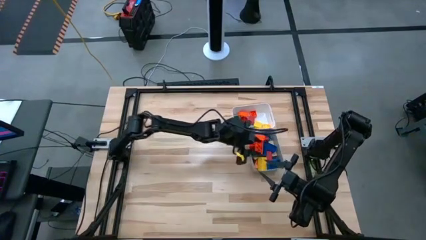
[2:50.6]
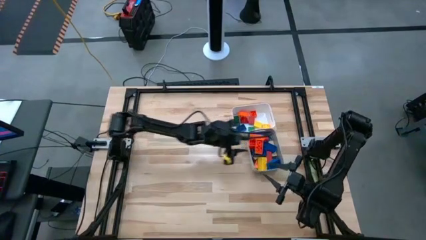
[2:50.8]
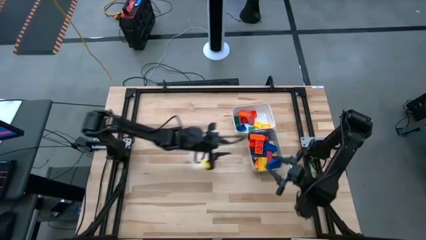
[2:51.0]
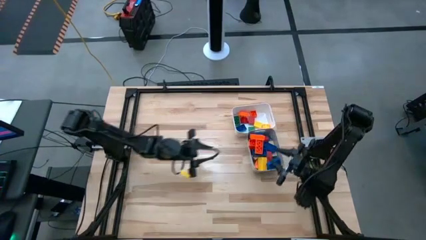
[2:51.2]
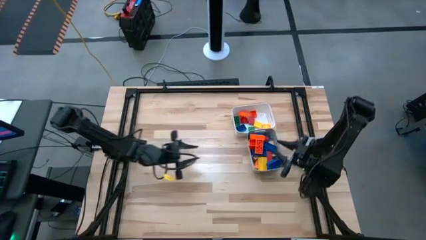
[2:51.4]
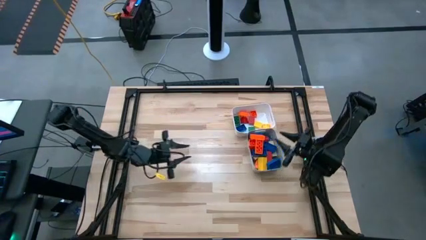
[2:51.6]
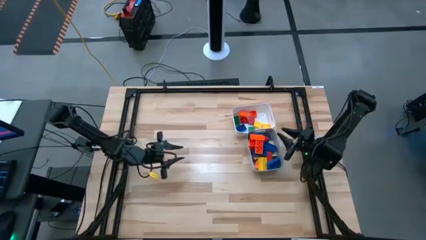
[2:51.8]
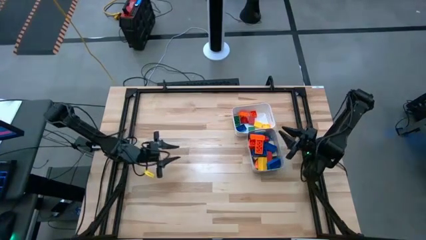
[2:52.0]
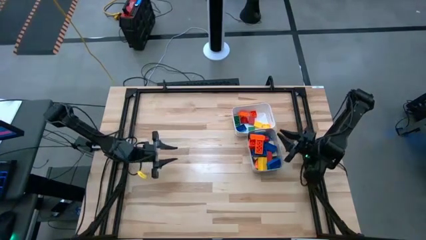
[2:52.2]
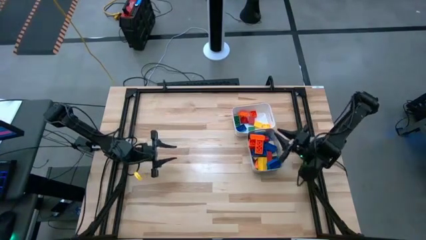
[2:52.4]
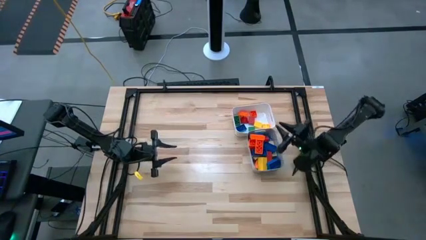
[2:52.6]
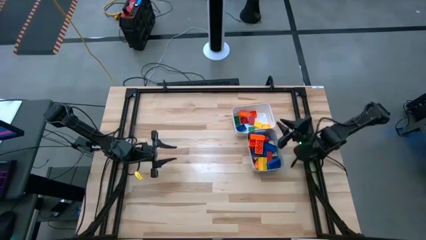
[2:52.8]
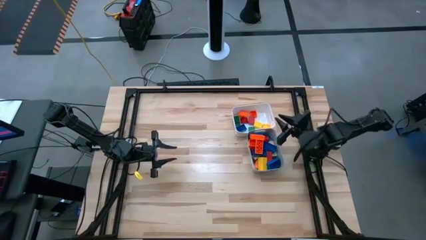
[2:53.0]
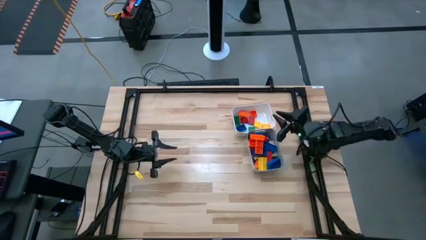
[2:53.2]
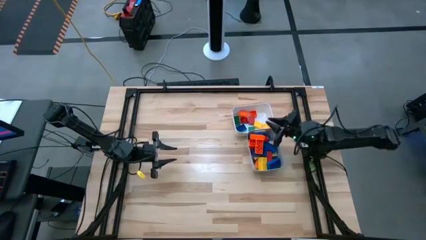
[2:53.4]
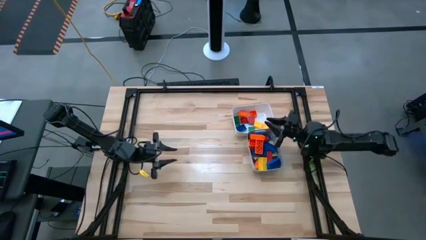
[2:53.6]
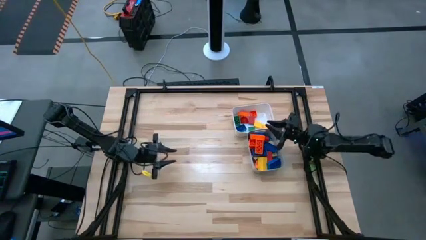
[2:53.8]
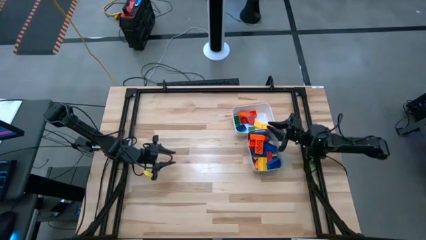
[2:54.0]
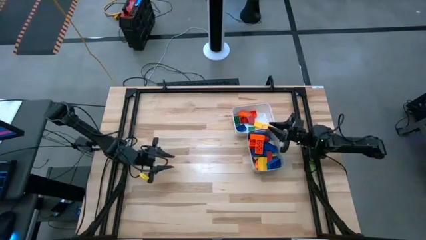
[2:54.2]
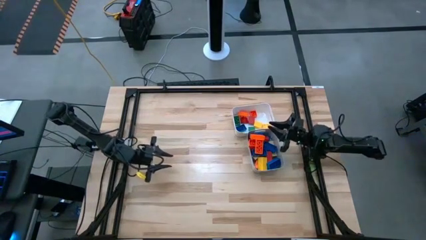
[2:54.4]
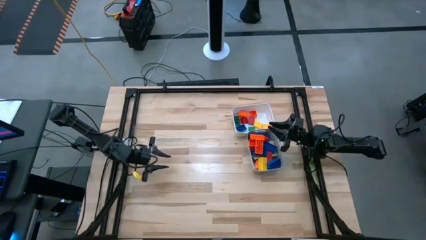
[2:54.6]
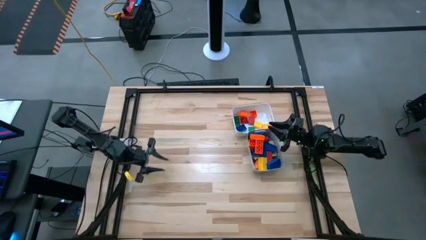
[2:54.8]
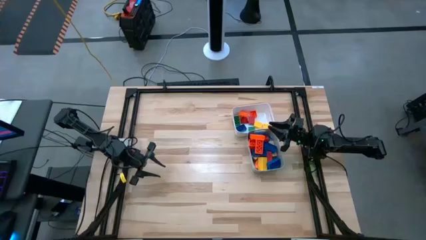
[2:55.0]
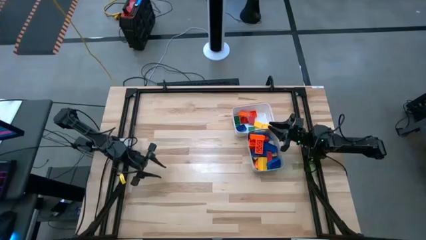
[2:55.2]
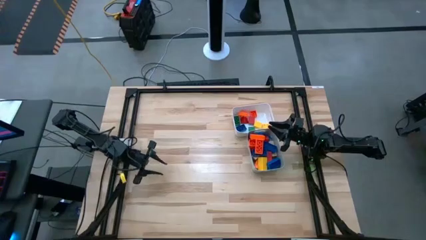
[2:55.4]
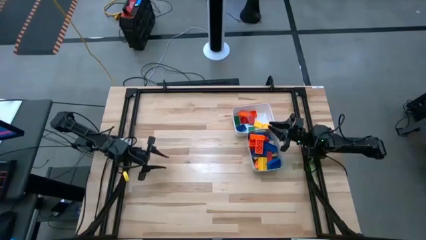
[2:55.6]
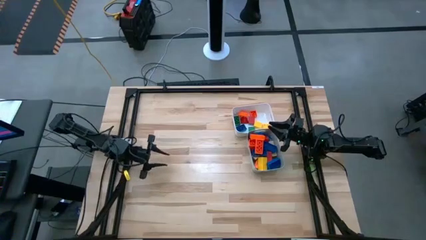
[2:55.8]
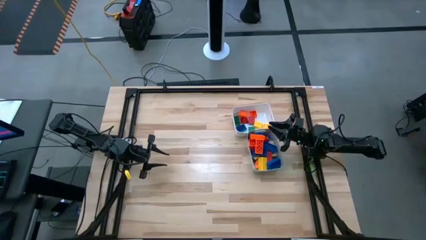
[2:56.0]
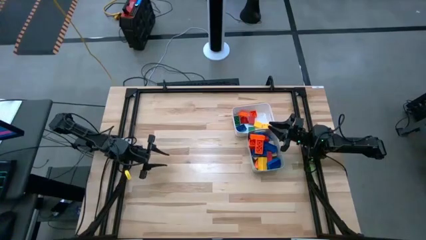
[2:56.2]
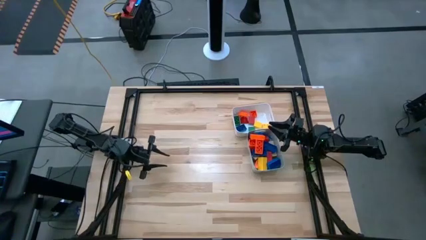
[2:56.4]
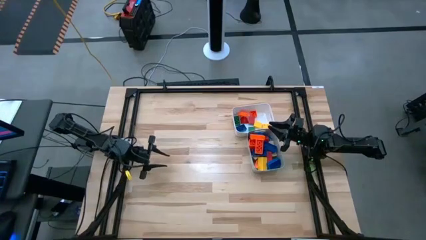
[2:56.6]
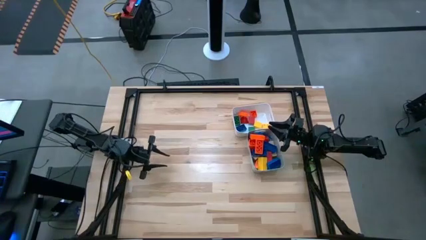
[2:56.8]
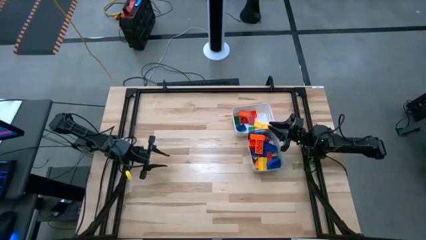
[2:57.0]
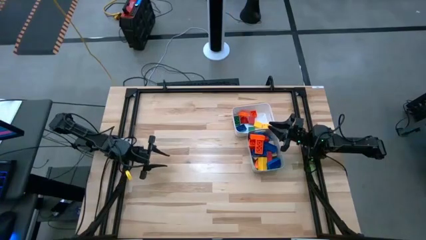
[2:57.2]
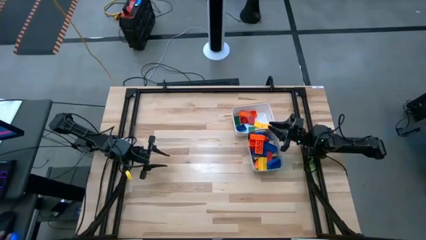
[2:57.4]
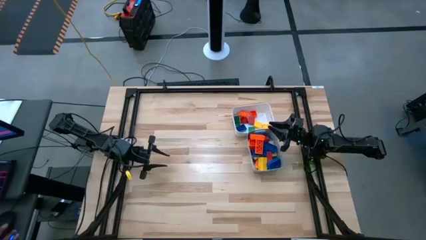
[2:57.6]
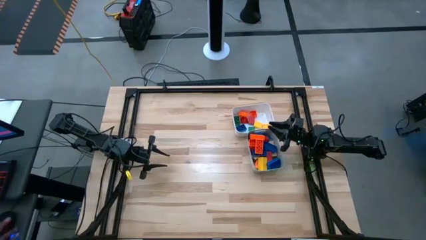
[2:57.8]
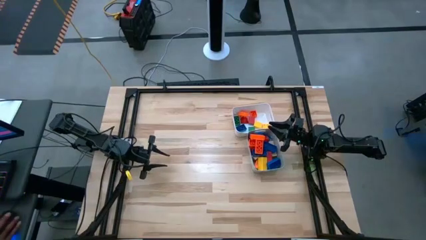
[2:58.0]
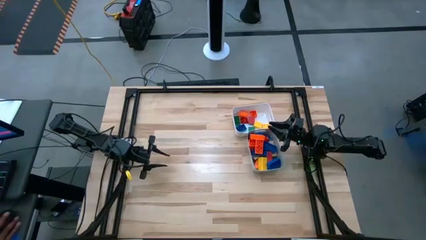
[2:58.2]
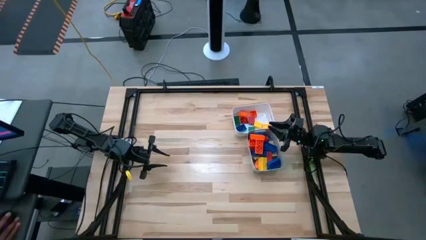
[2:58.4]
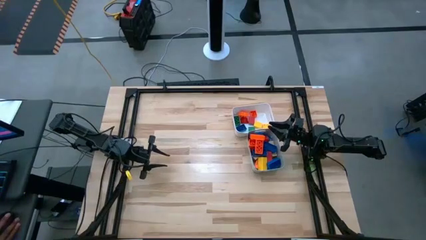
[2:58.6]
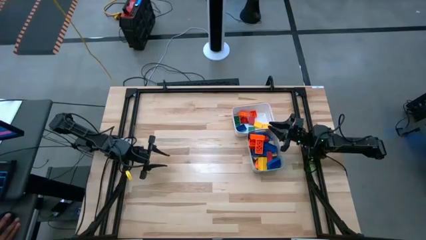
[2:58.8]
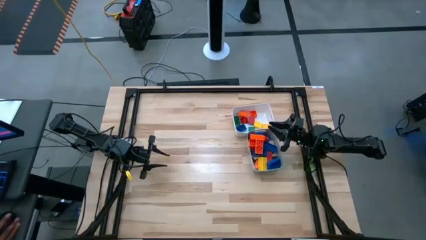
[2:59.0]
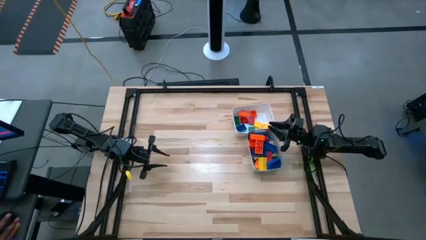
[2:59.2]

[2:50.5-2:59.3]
Task: Sort blocks by size
Return to Home Position

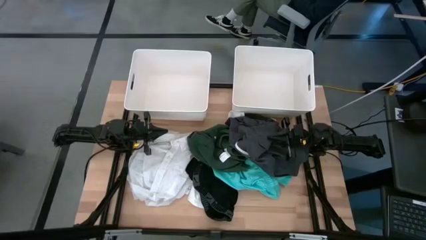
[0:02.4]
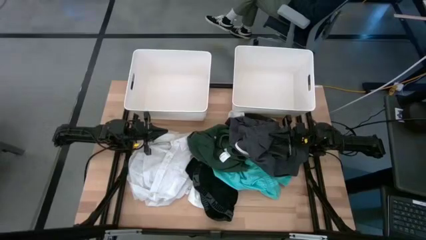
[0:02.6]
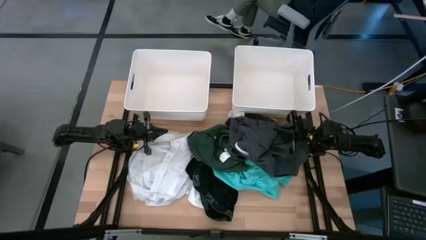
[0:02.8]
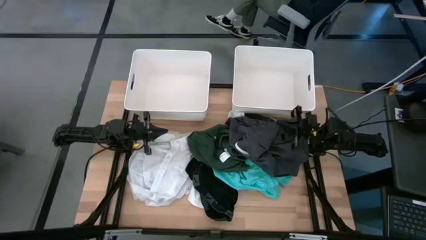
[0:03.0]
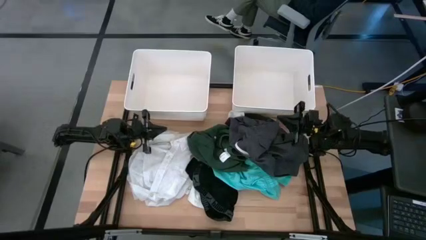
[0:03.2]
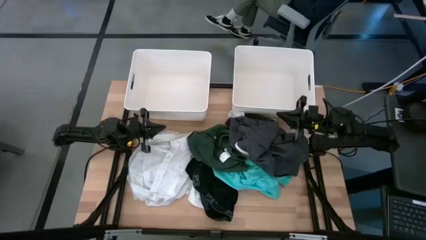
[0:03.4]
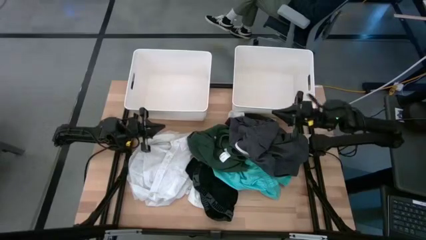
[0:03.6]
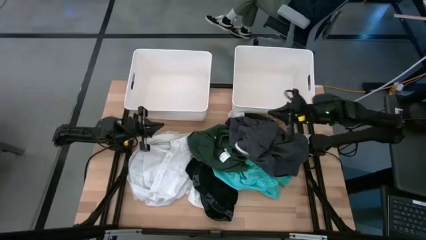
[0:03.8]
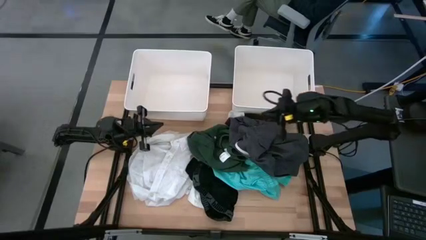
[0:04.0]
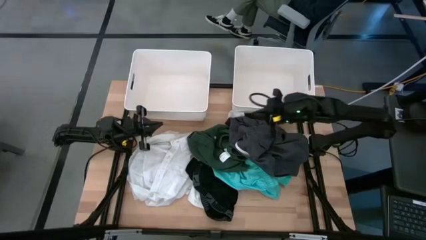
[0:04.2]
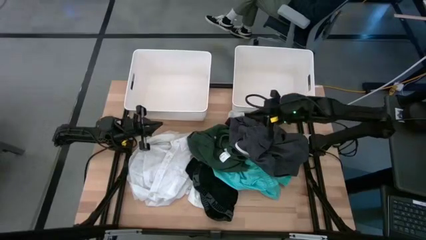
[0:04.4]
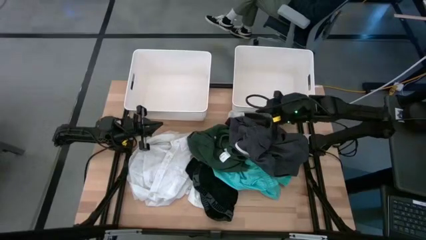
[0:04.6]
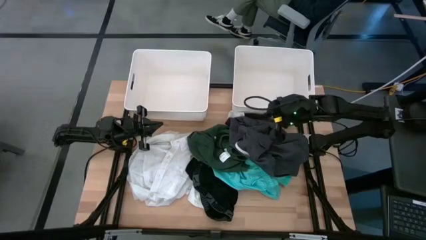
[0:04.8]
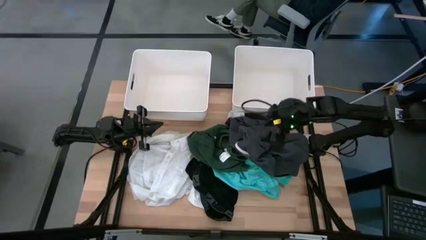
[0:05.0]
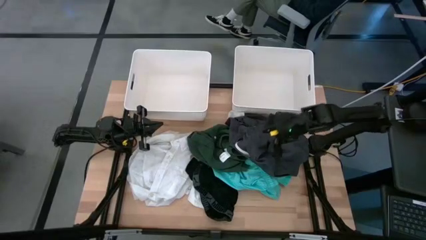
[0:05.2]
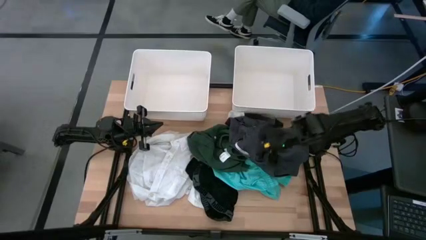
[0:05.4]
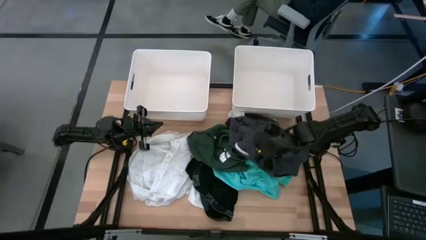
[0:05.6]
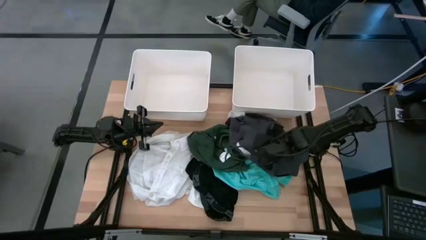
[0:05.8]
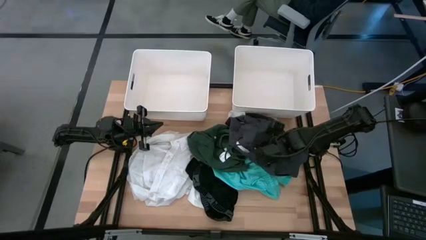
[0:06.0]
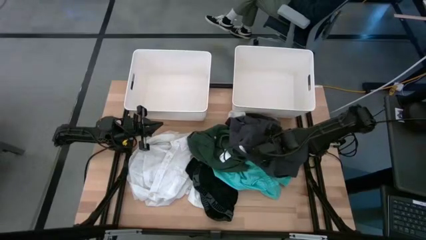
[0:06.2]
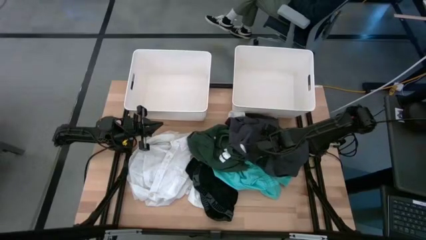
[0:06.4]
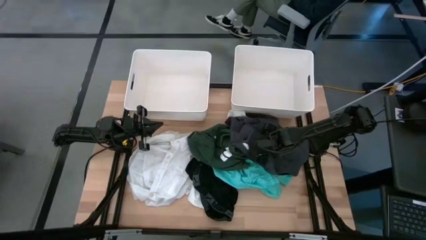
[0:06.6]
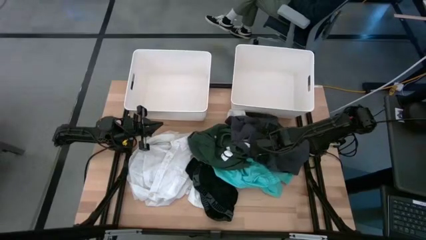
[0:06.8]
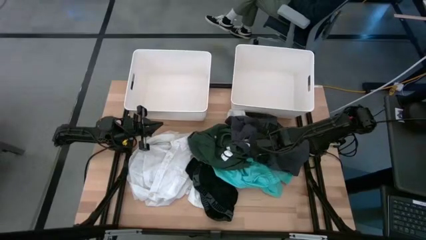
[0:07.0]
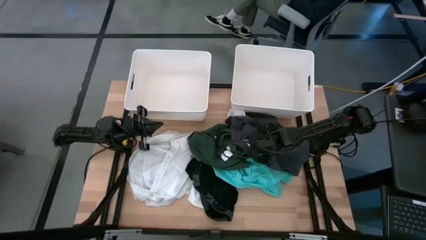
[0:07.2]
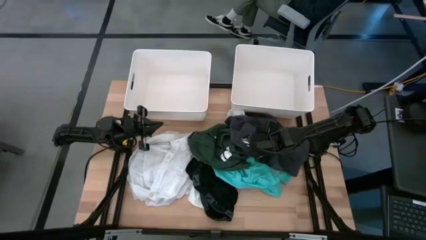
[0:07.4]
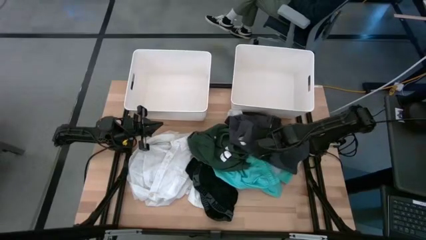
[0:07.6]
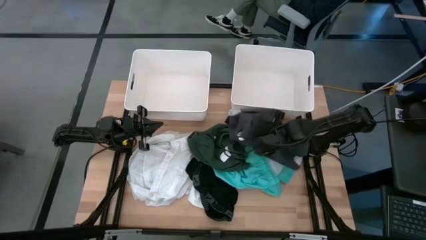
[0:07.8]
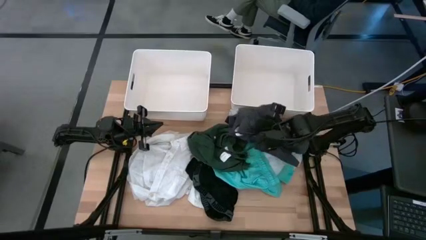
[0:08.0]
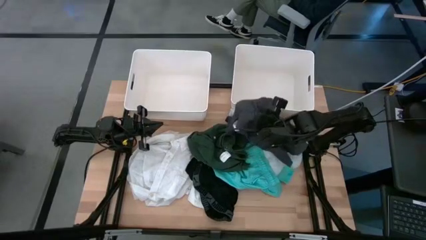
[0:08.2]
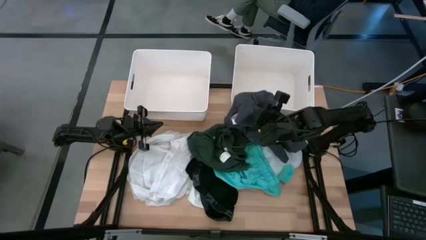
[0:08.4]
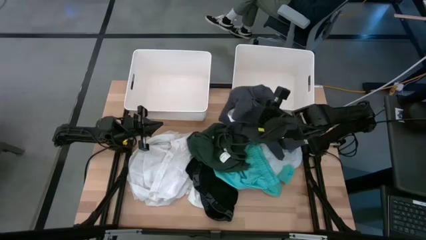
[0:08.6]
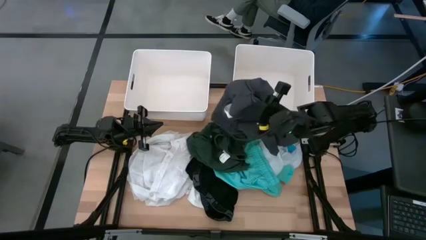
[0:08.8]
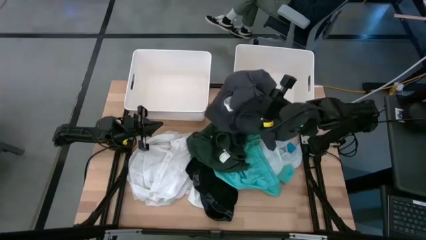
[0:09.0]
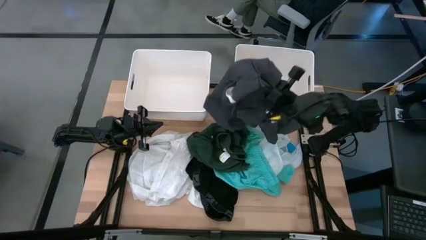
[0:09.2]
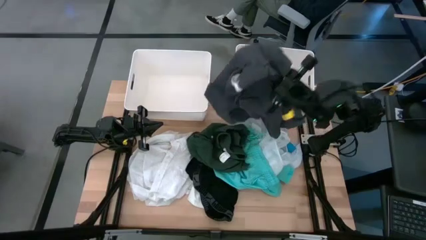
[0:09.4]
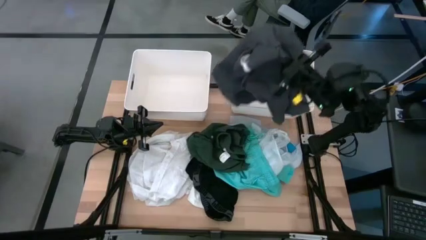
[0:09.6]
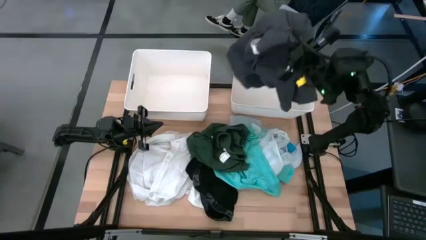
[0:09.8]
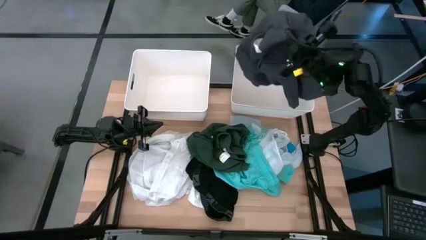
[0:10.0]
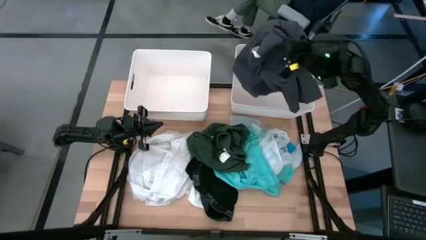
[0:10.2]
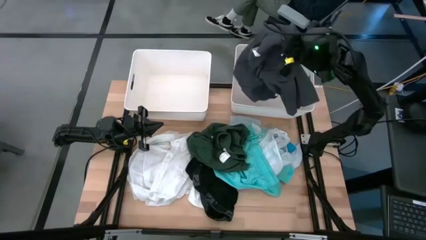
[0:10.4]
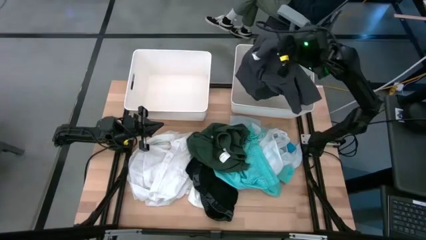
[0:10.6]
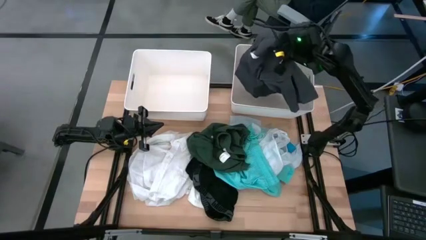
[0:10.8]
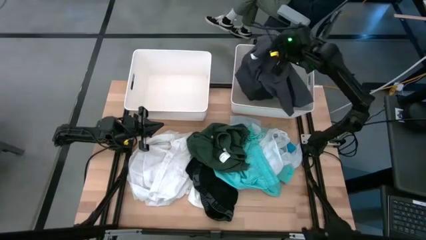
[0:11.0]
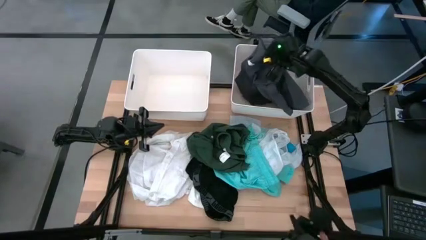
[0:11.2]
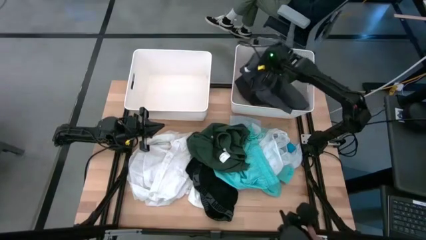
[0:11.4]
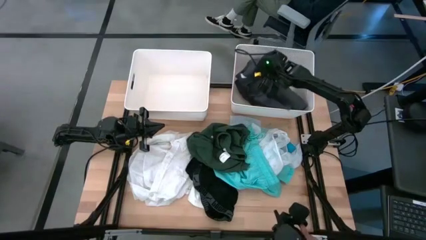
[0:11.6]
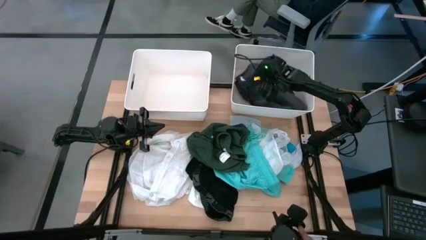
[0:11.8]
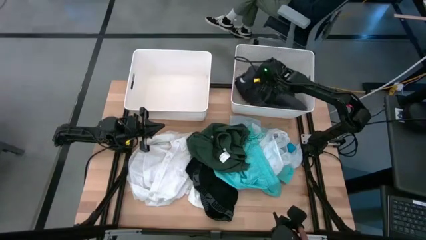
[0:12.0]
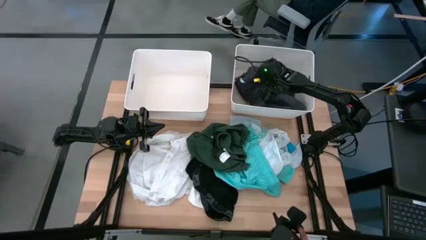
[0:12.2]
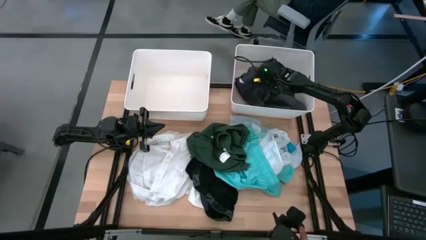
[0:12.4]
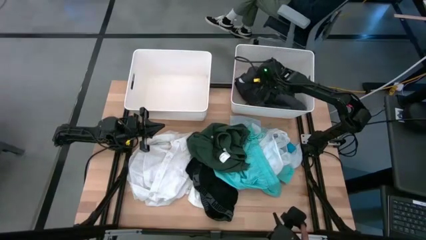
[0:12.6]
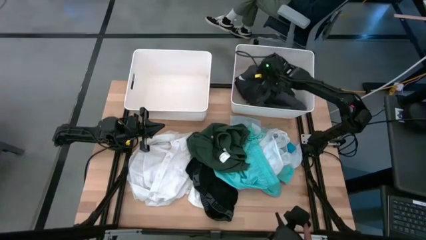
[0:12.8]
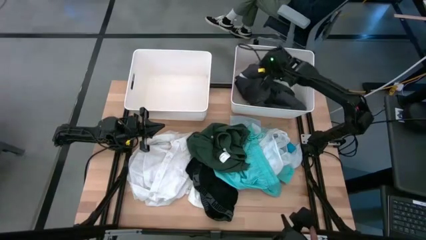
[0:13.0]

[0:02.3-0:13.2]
Task: Sort clothes
Put the dark blue shorts into the right white bin
